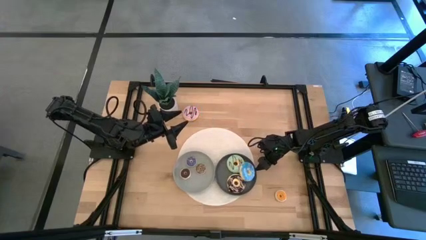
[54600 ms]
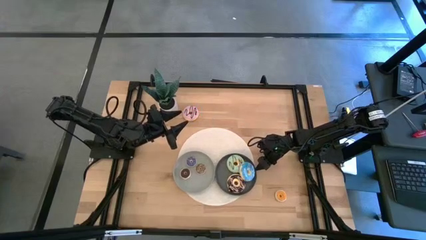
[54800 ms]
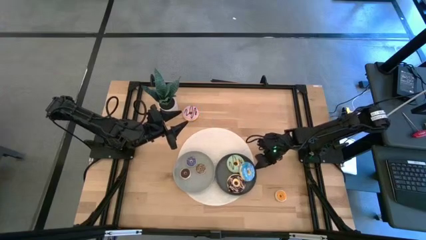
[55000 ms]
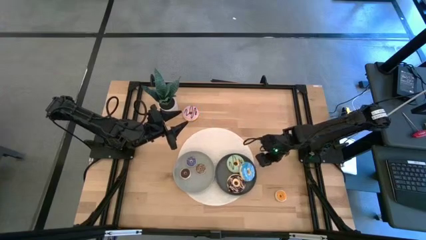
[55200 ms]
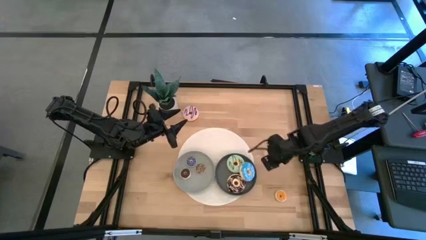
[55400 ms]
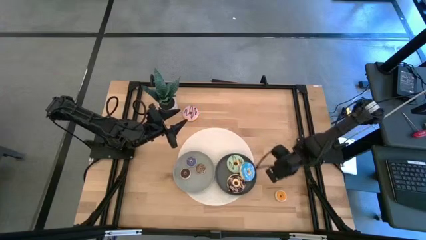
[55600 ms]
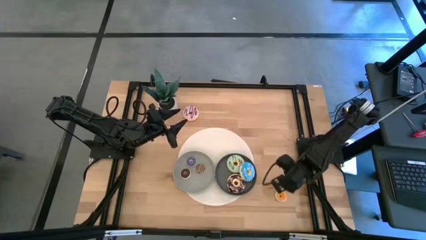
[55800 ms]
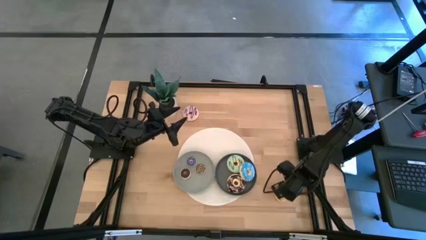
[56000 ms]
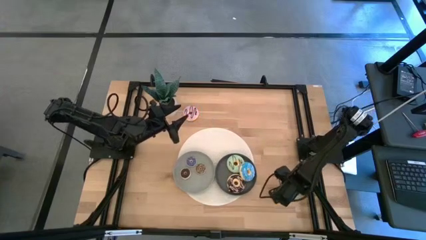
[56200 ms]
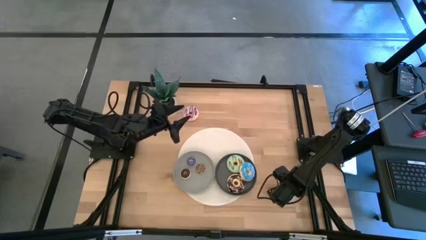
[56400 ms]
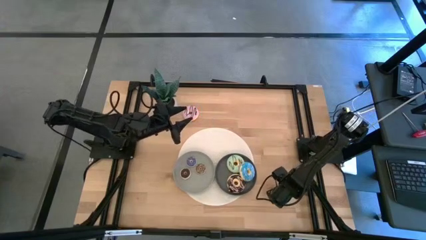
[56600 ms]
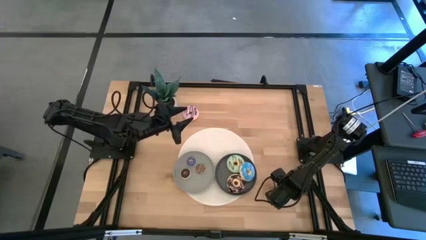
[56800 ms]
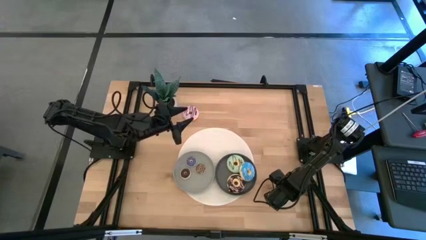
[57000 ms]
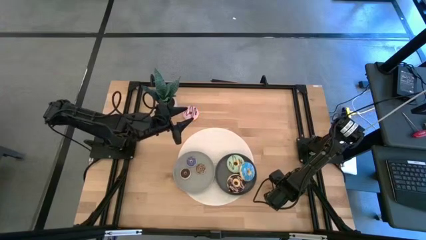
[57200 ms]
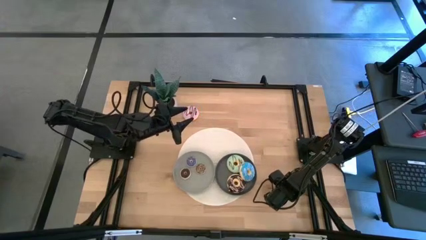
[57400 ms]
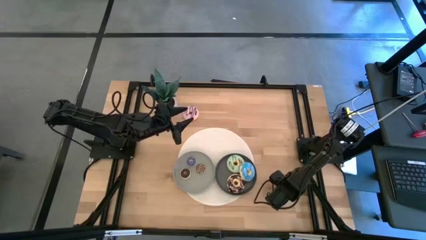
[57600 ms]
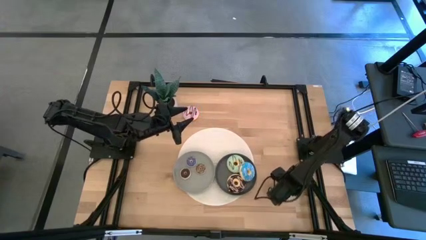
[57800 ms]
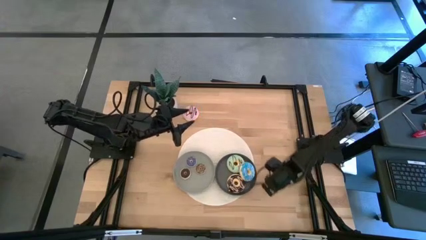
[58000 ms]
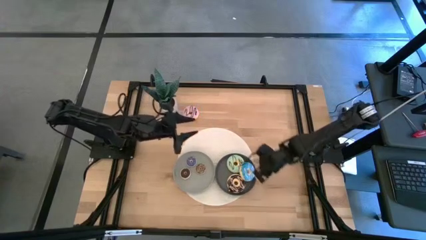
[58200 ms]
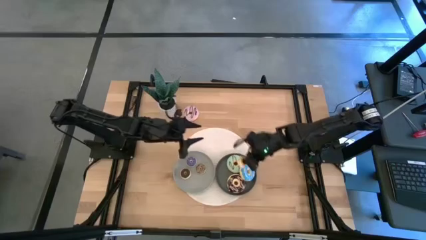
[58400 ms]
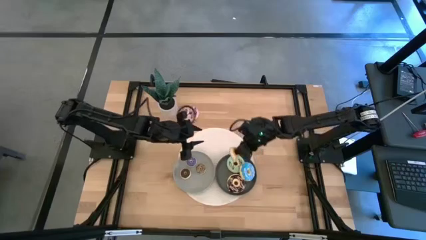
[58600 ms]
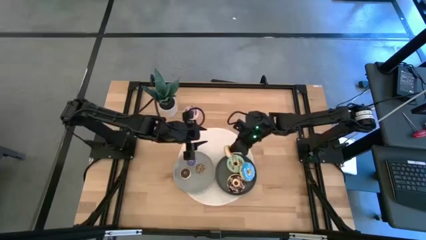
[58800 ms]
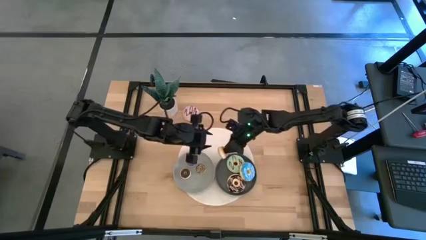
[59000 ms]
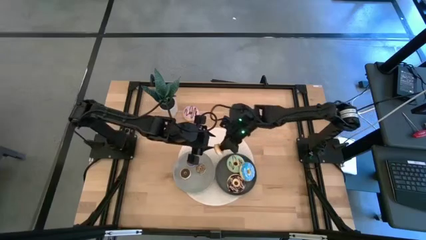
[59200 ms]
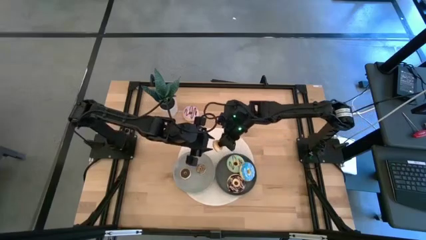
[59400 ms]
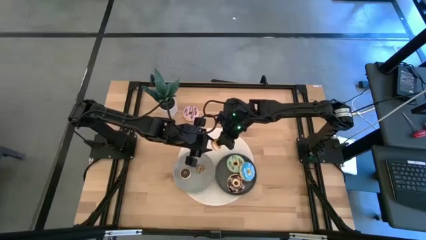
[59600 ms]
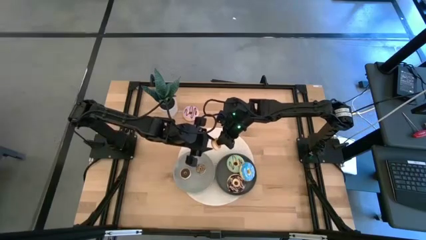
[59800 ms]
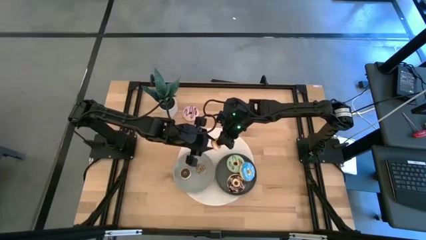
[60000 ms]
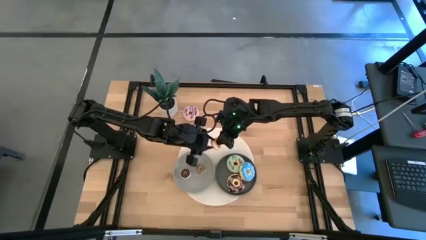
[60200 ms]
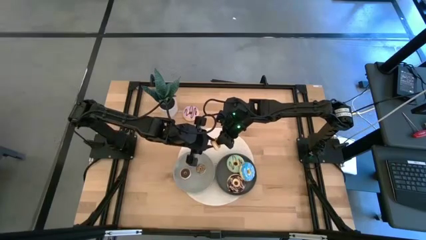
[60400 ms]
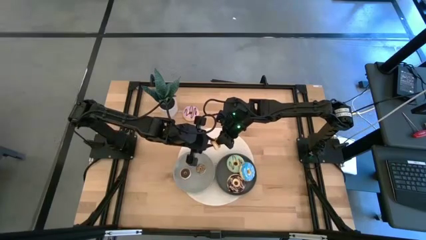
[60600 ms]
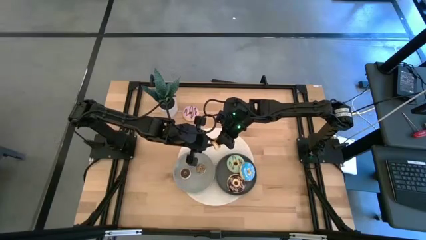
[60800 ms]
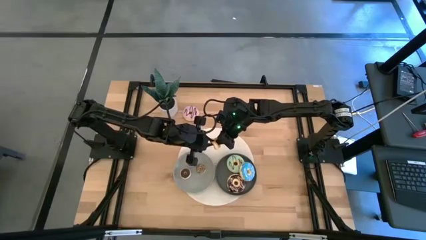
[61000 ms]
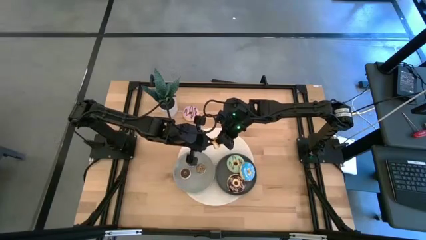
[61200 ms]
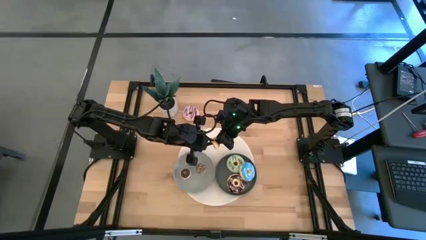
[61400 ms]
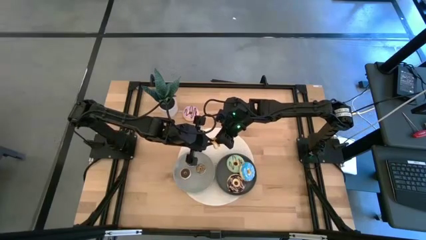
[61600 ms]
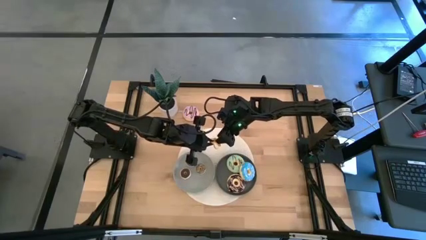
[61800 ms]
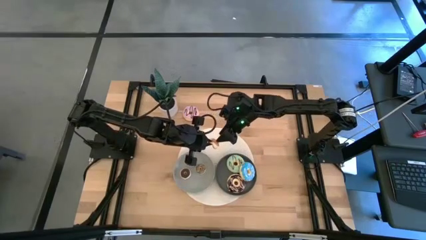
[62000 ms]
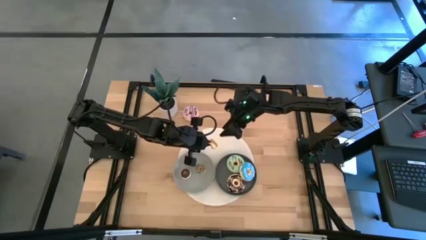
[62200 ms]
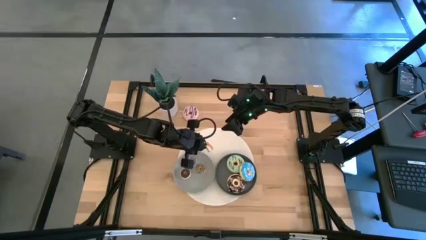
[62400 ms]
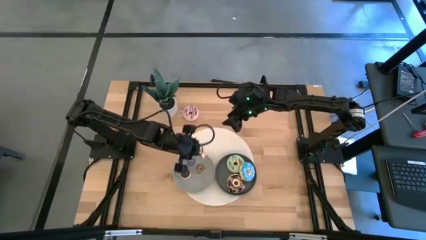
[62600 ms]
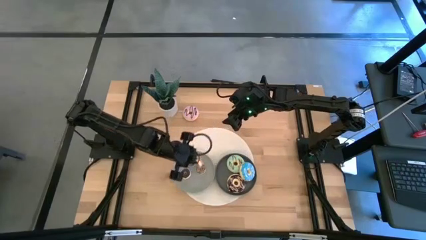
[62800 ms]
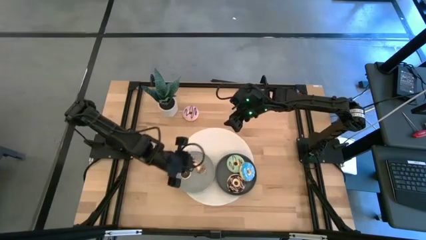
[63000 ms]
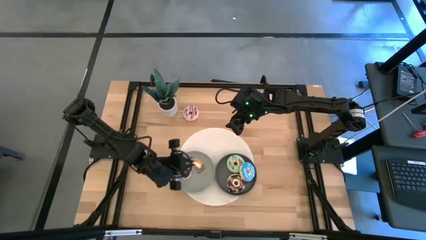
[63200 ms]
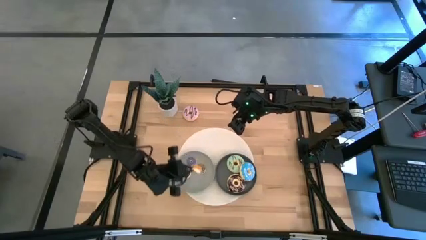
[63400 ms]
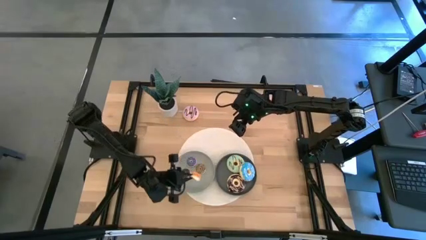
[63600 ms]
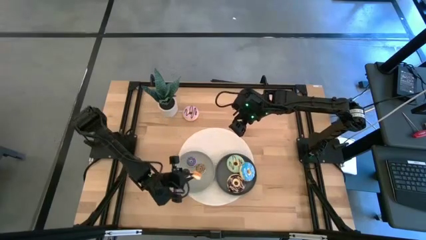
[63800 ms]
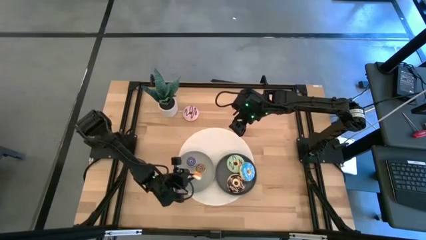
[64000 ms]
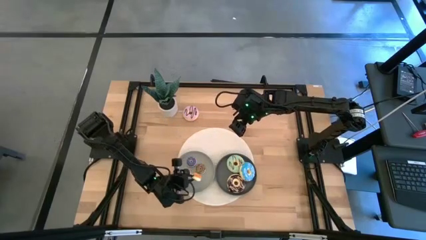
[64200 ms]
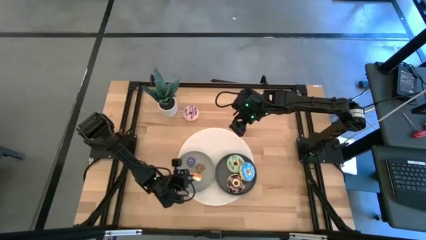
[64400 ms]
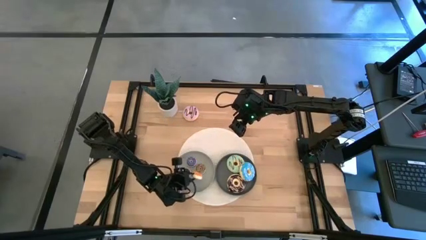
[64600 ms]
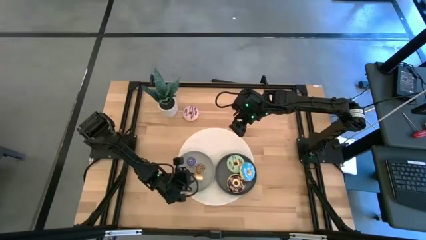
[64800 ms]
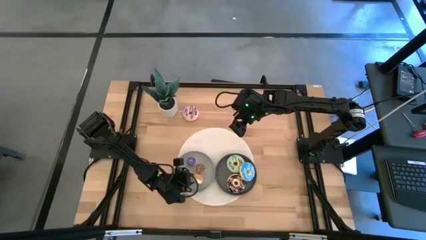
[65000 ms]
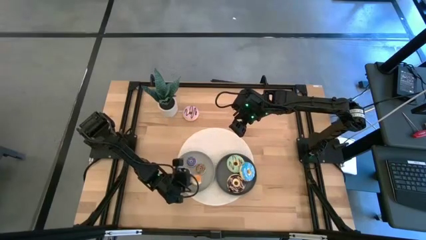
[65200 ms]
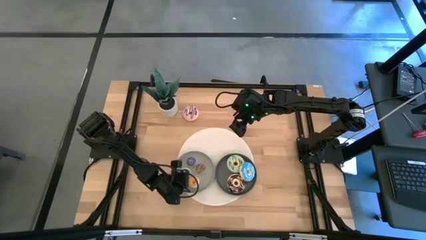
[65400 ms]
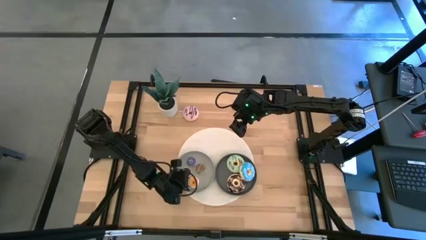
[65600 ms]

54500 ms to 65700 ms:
Task: Pick & Place donuts
Put the small yellow donut on the light gray plate

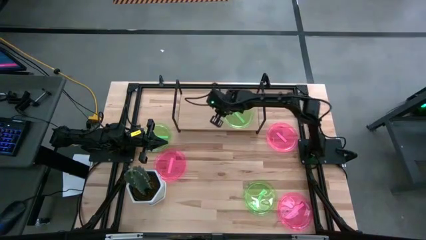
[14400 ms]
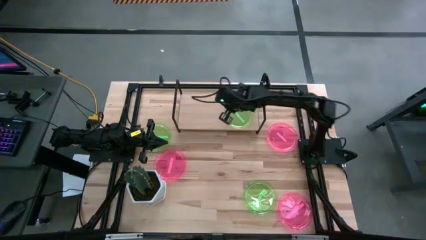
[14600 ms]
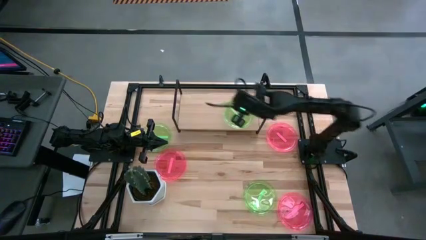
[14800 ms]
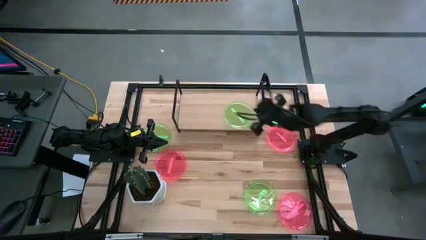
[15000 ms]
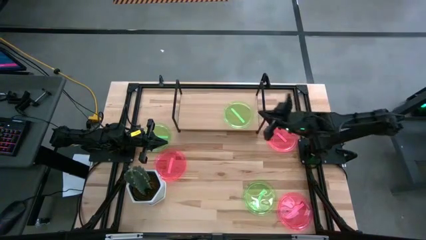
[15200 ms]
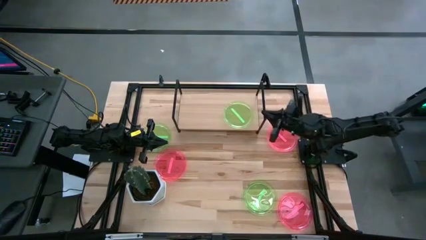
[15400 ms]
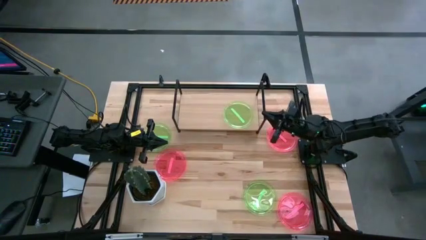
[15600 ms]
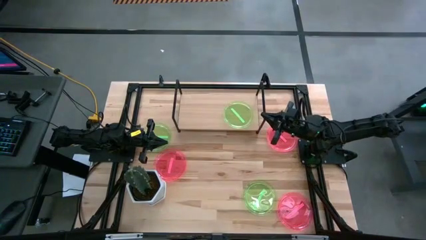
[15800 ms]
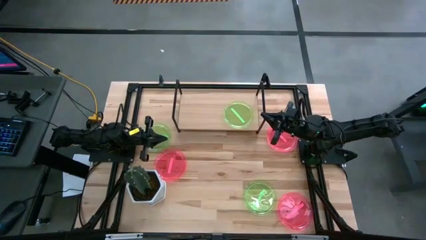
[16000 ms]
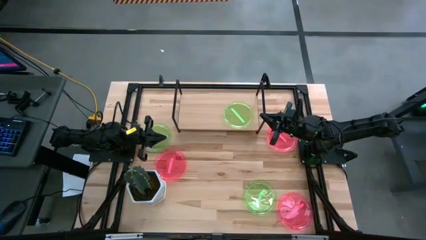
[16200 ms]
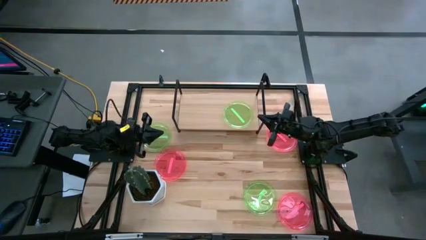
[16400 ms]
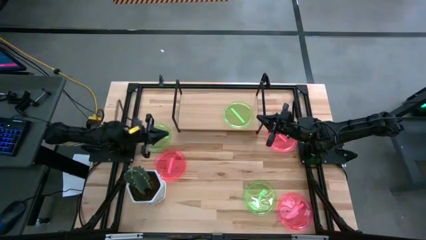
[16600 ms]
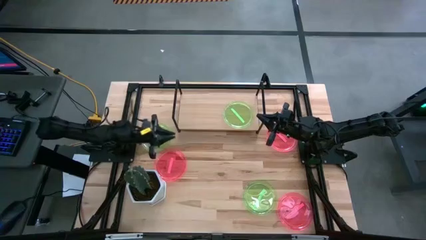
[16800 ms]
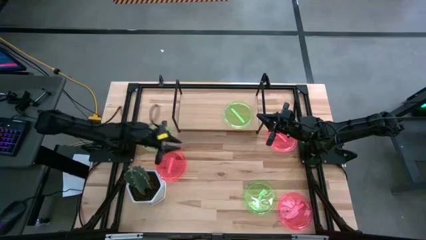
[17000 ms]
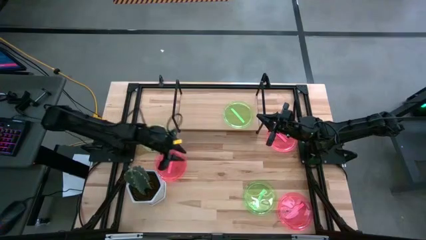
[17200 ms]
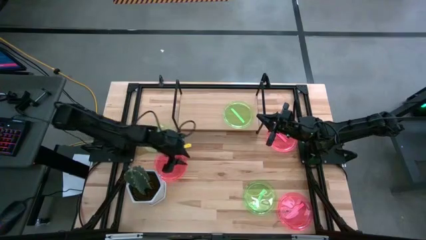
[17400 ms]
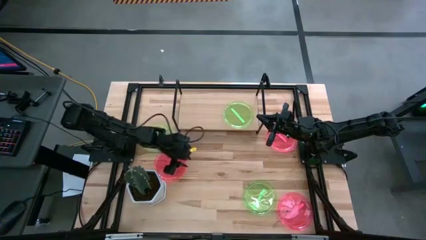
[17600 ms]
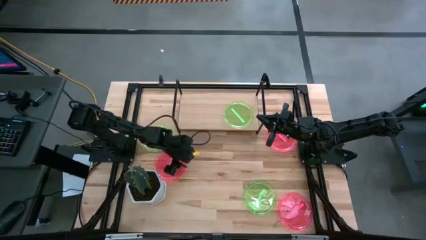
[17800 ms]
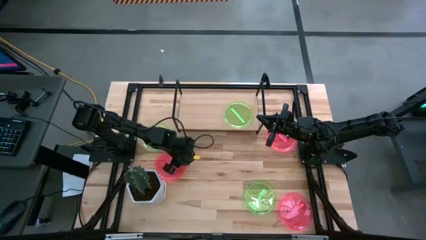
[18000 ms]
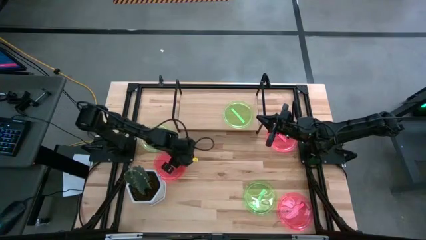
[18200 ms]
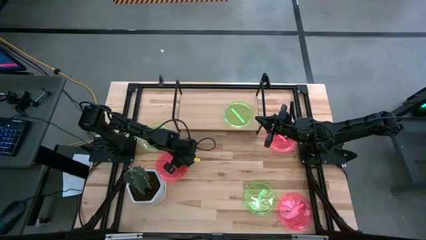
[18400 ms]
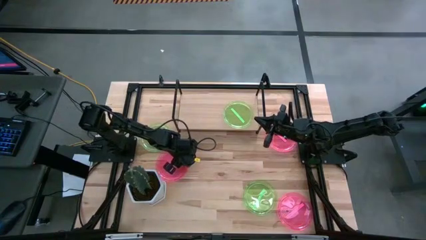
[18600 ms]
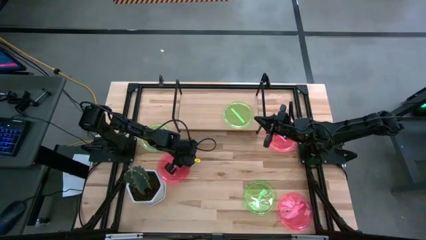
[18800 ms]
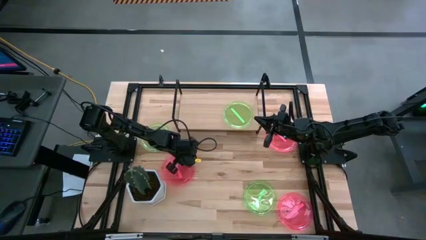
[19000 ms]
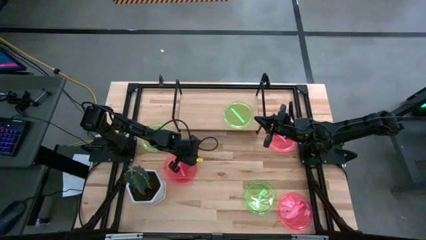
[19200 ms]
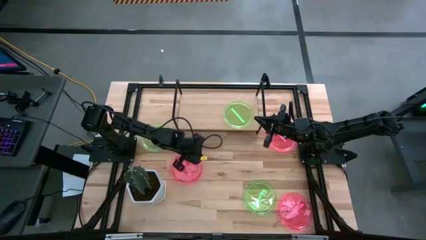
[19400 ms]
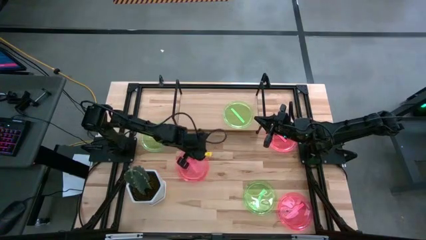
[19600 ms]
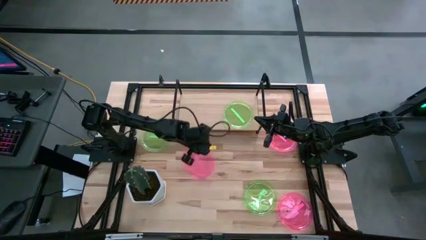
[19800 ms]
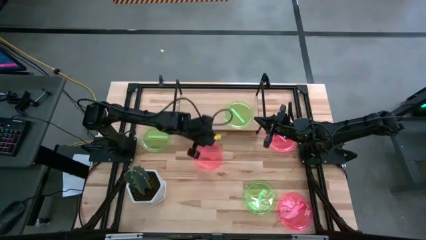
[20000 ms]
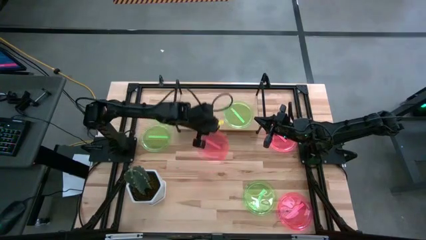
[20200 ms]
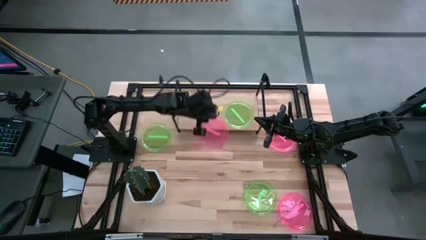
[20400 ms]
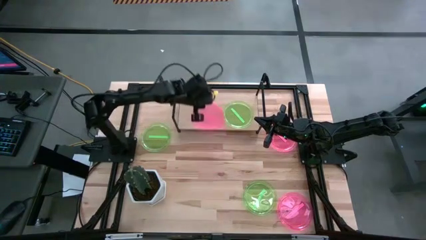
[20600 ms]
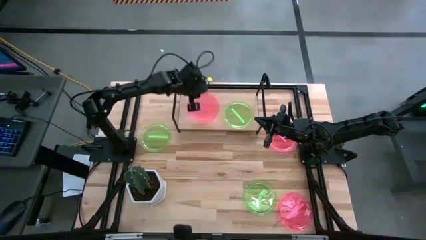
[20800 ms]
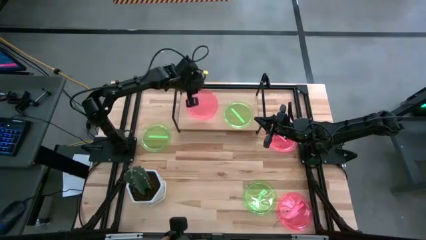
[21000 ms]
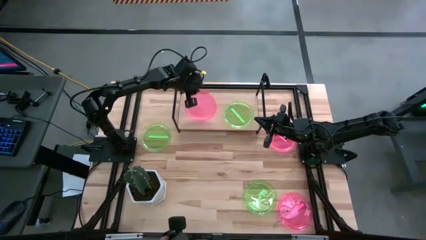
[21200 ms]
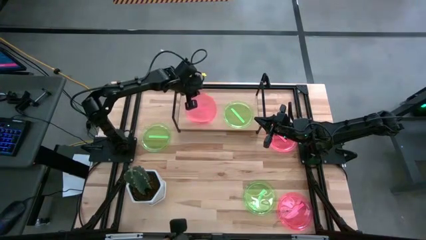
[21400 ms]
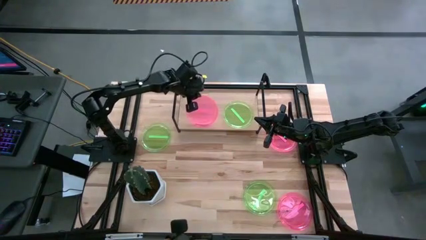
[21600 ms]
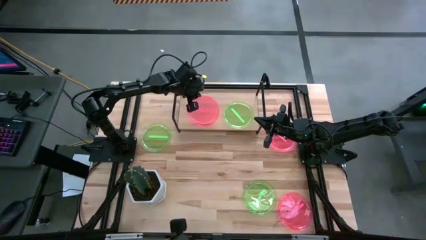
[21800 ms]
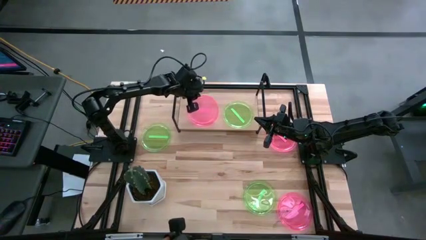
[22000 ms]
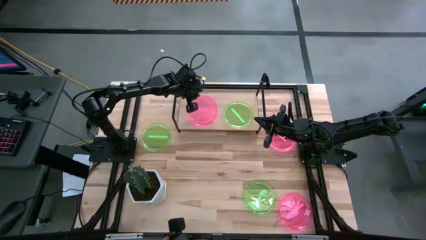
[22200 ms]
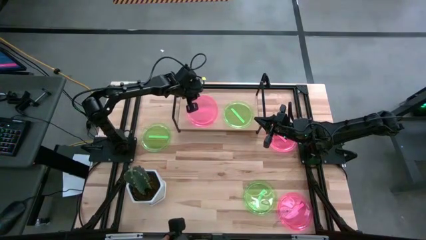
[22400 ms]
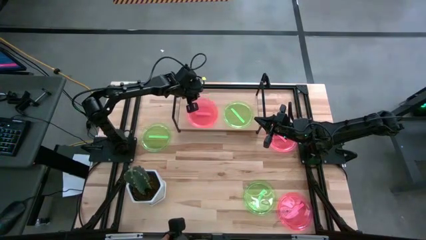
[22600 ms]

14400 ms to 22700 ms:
Task: Place and stack plates onto a shelf
Put the middle left pink plate on the shelf
